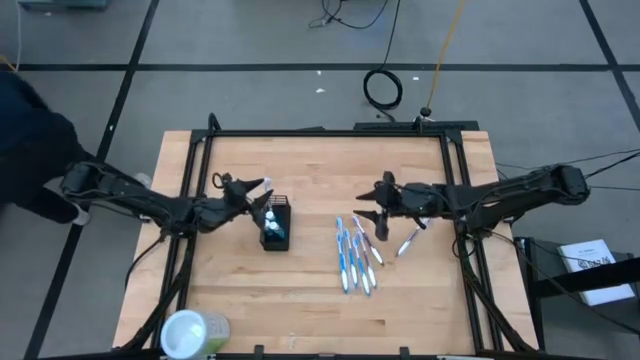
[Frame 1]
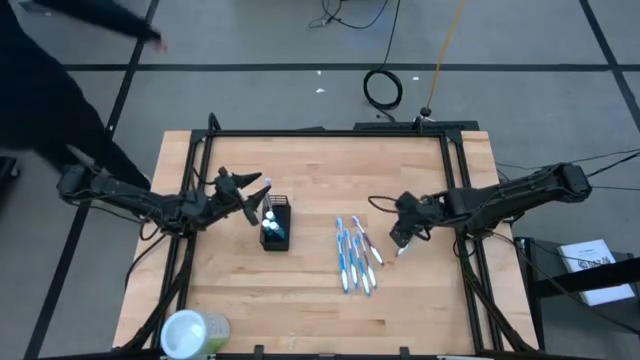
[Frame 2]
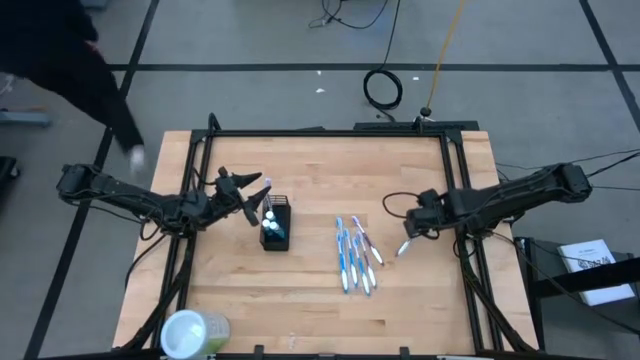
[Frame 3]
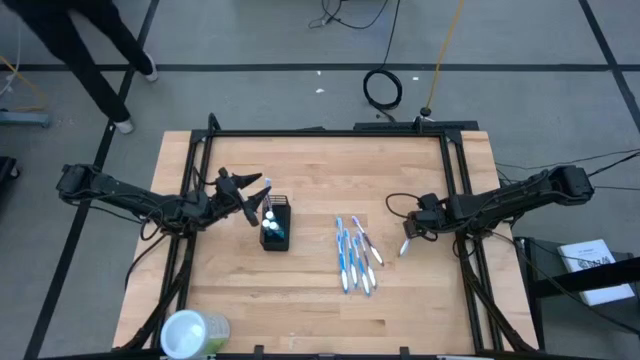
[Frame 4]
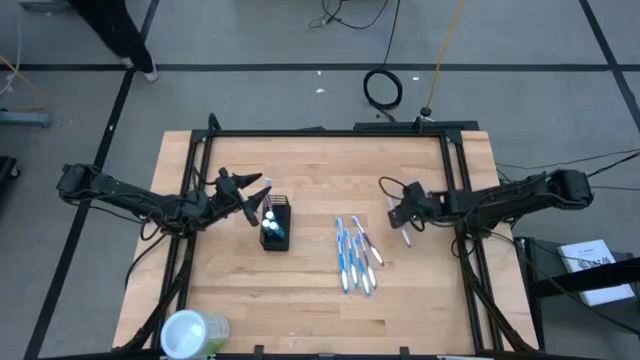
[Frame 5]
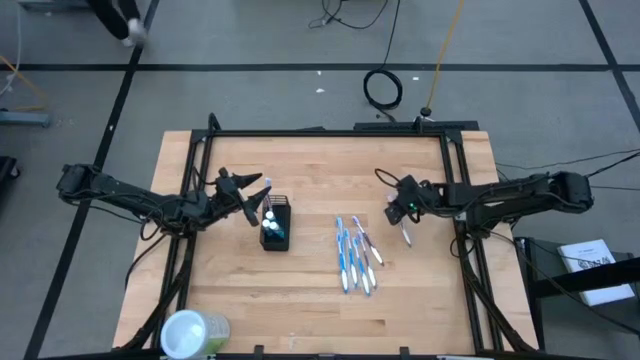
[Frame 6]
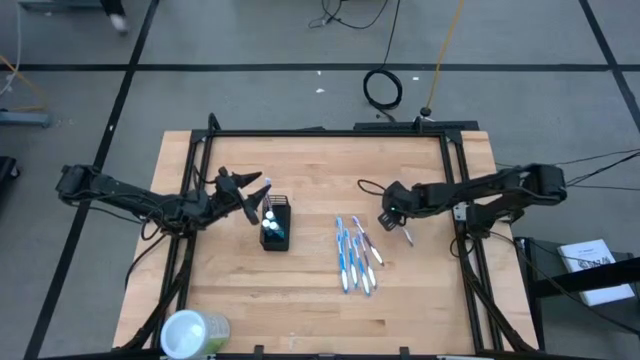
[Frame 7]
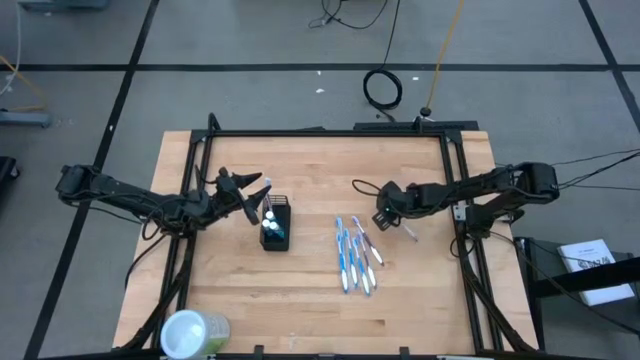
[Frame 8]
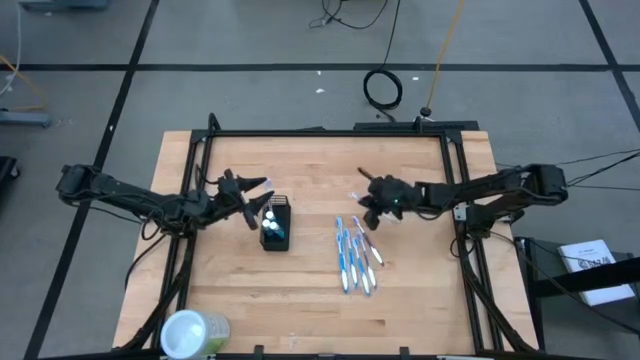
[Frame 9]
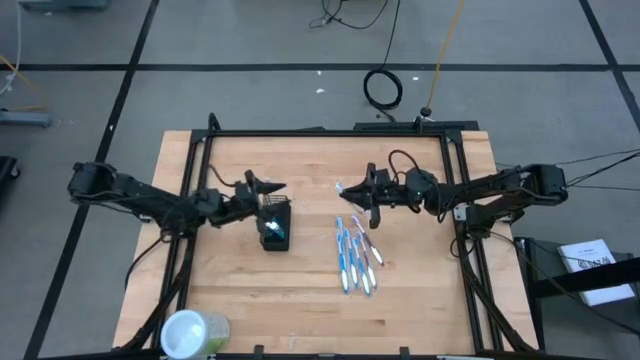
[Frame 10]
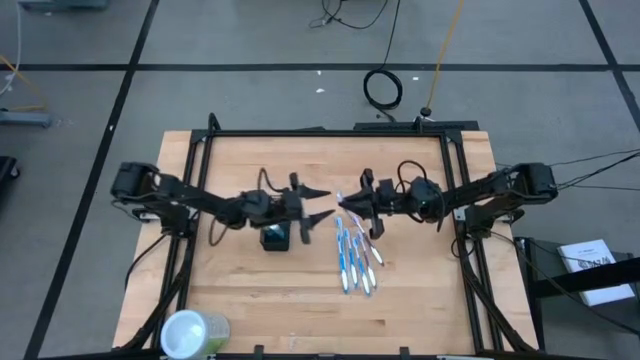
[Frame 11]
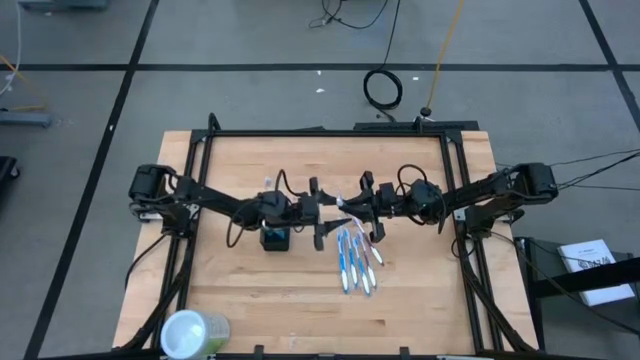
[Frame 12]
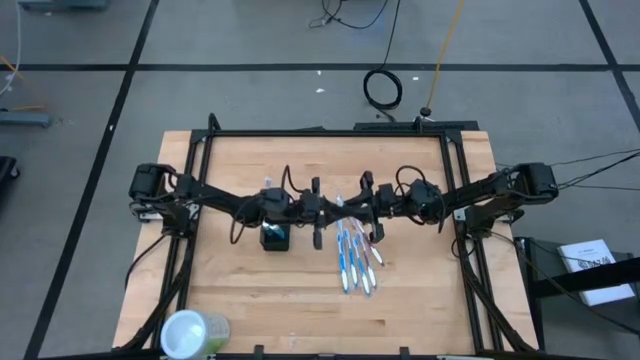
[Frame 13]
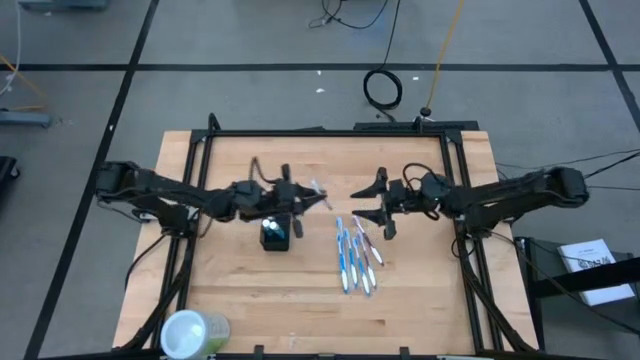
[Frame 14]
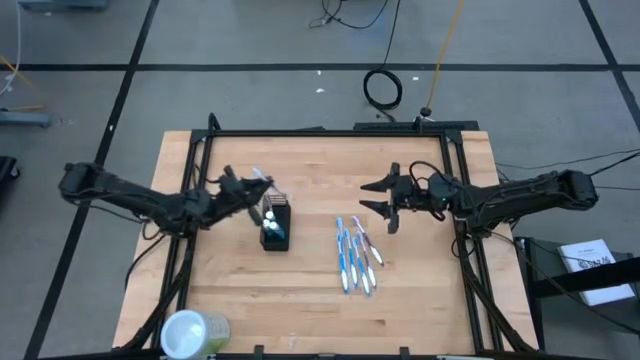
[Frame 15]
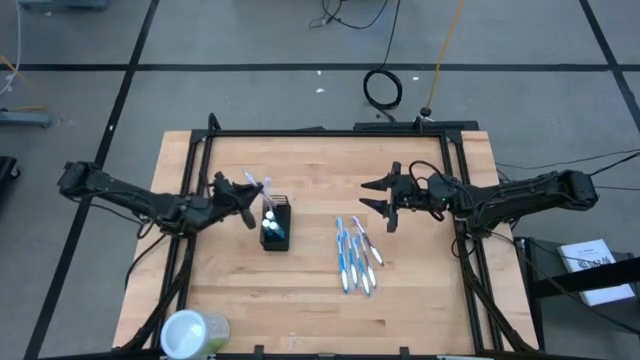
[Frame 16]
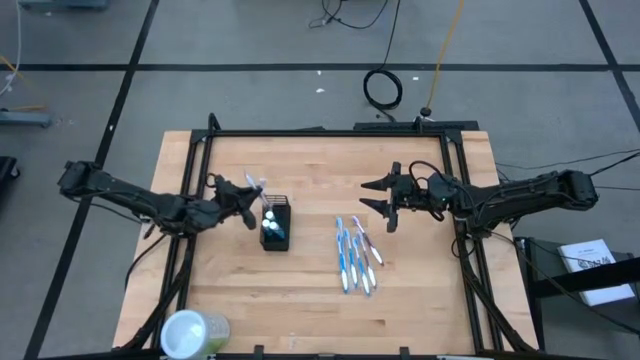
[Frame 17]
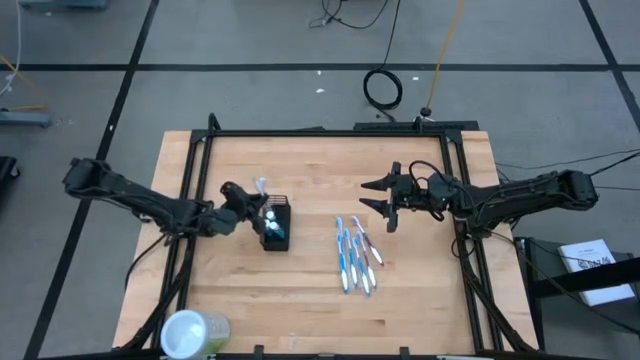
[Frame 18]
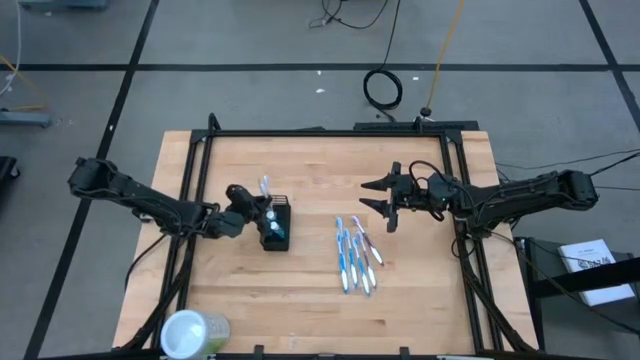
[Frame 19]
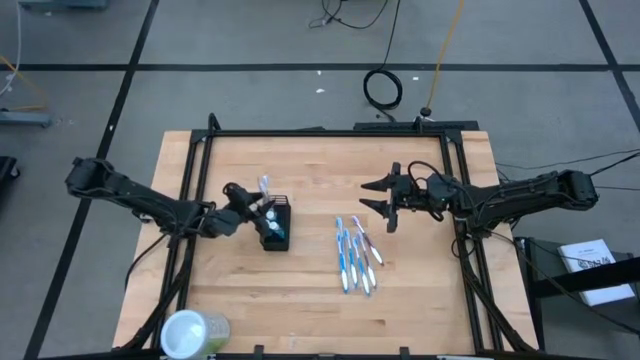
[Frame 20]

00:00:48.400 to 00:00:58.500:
Task: Pick & Place toothbrushing station
Put the purple toothbrush into the top compartment of the mesh organizer

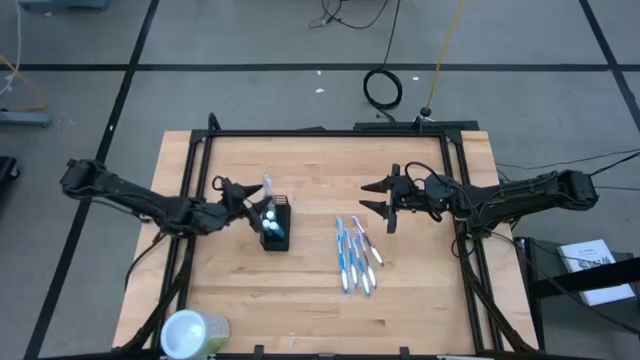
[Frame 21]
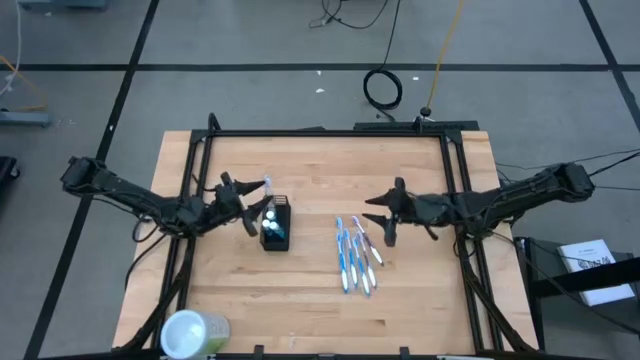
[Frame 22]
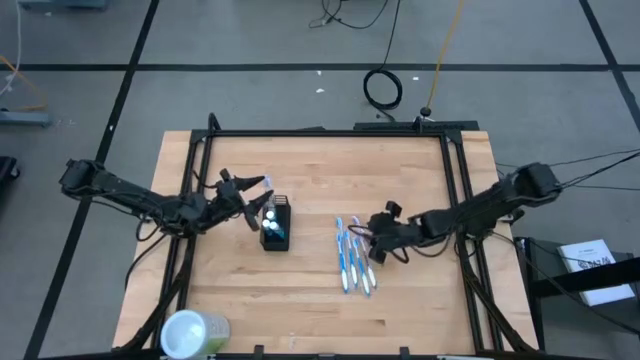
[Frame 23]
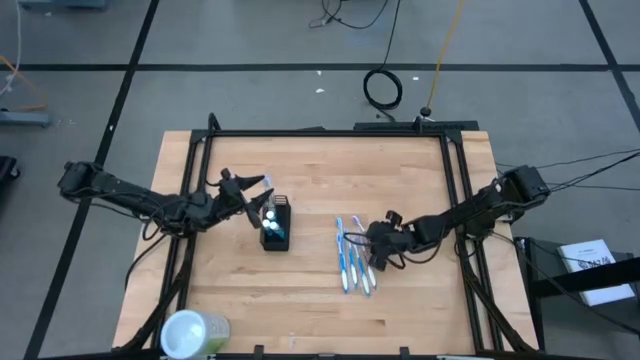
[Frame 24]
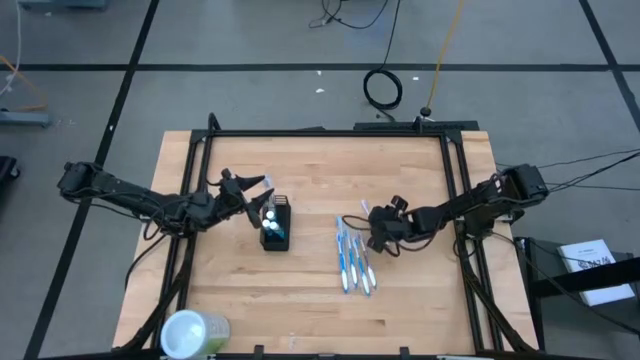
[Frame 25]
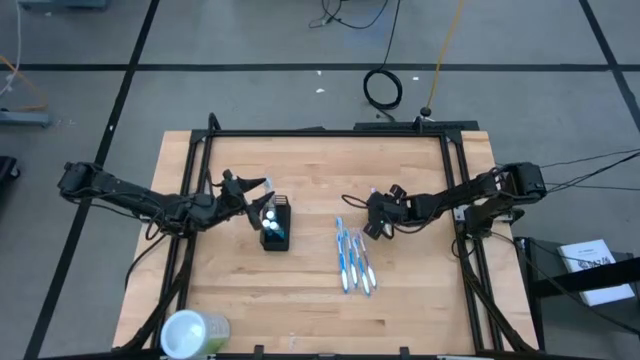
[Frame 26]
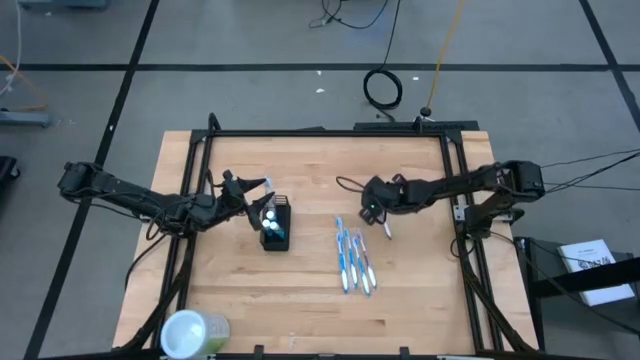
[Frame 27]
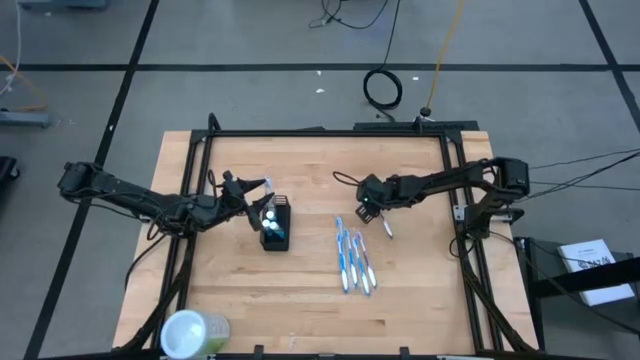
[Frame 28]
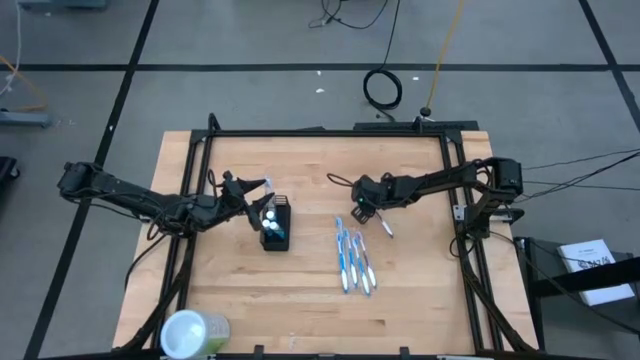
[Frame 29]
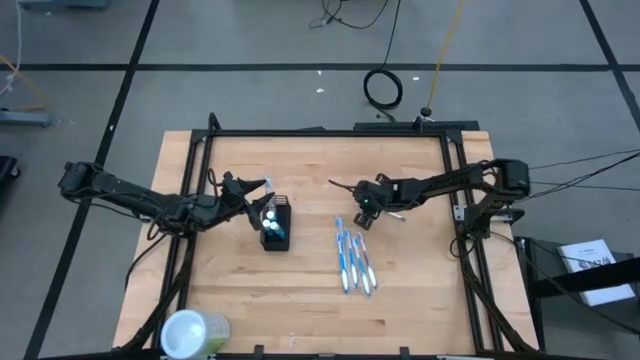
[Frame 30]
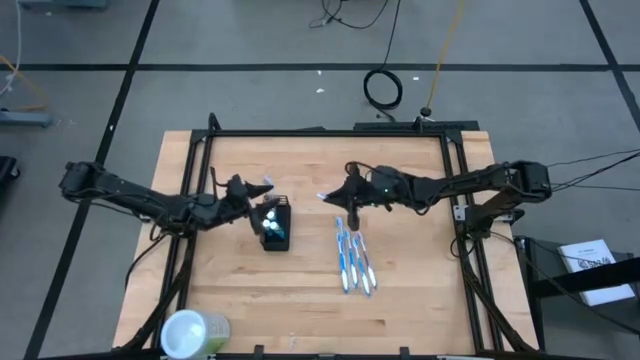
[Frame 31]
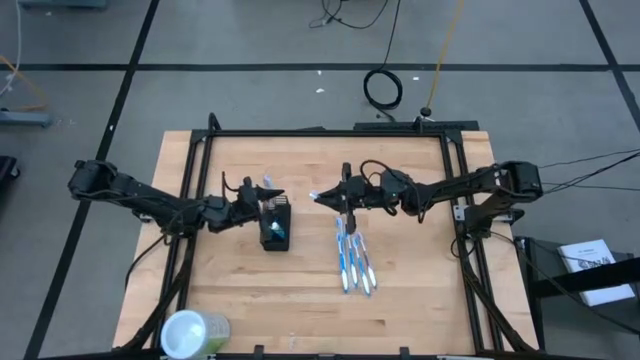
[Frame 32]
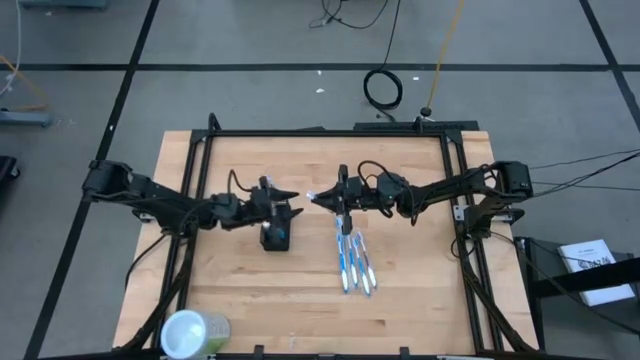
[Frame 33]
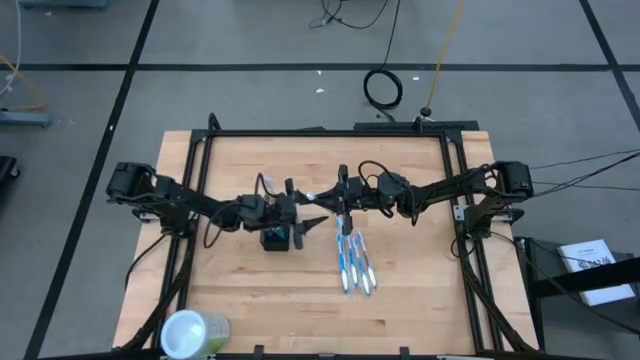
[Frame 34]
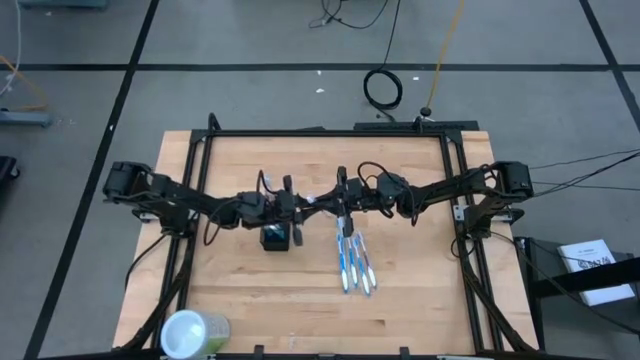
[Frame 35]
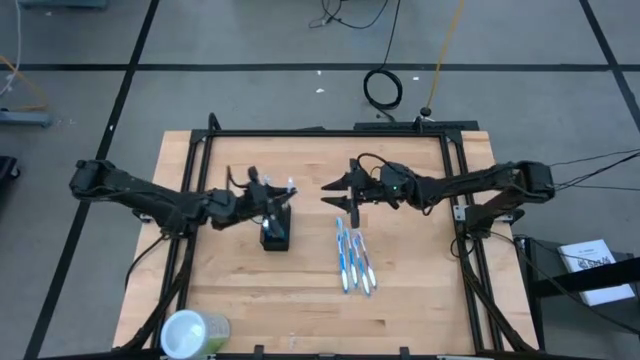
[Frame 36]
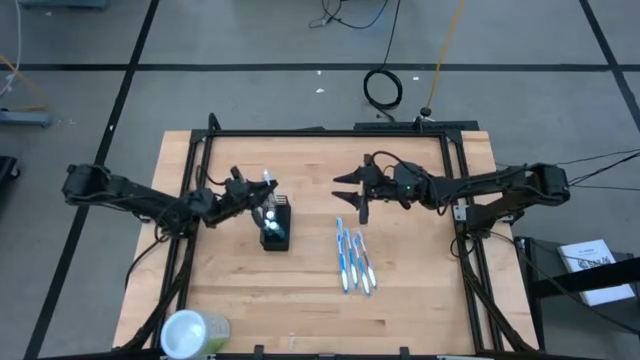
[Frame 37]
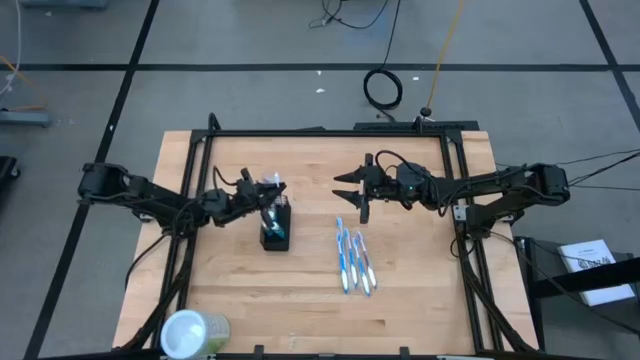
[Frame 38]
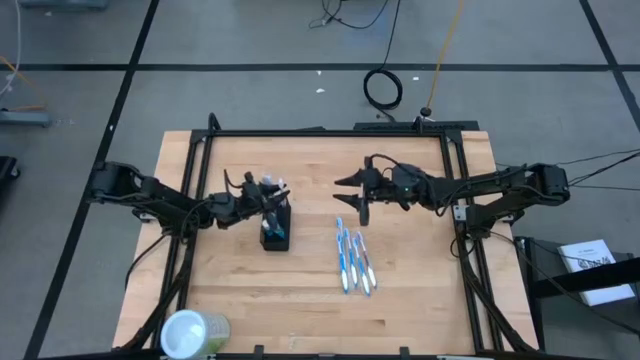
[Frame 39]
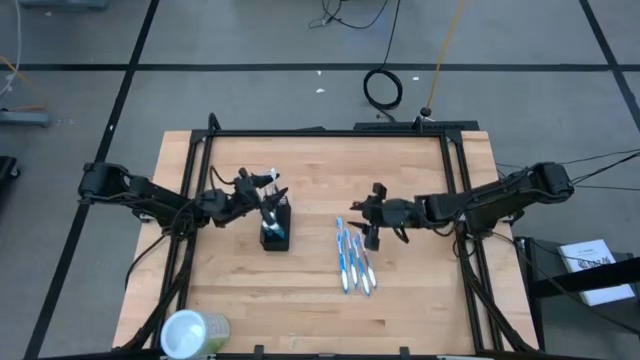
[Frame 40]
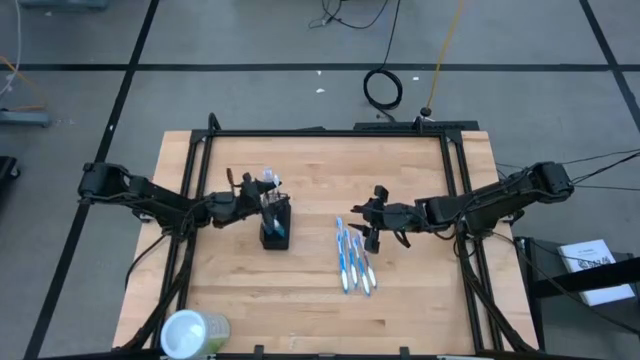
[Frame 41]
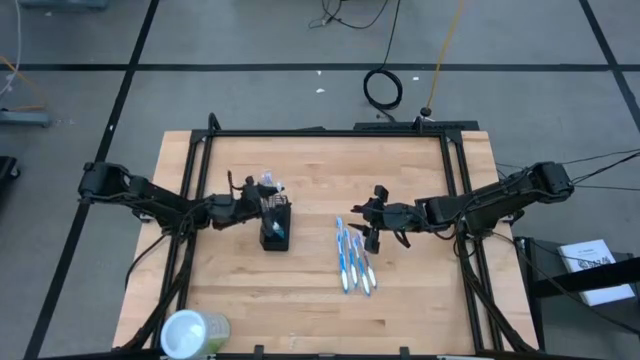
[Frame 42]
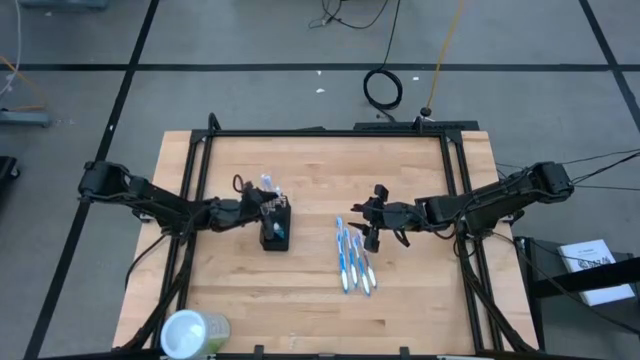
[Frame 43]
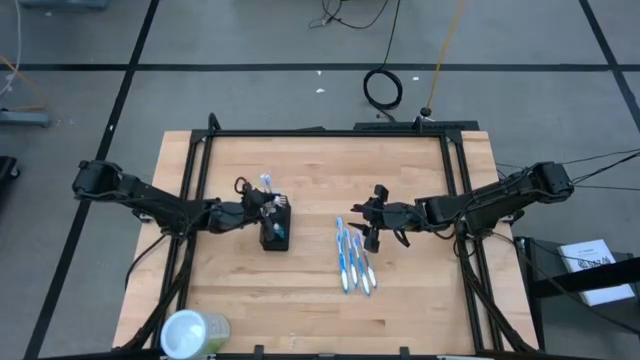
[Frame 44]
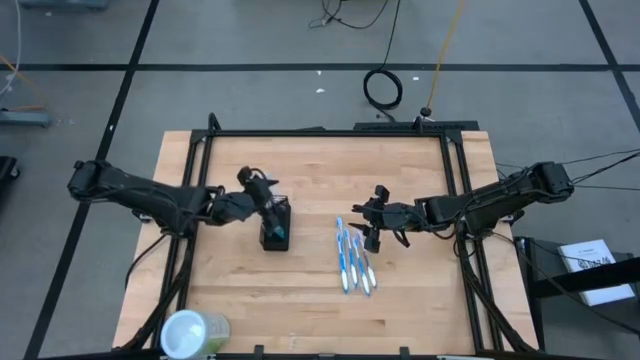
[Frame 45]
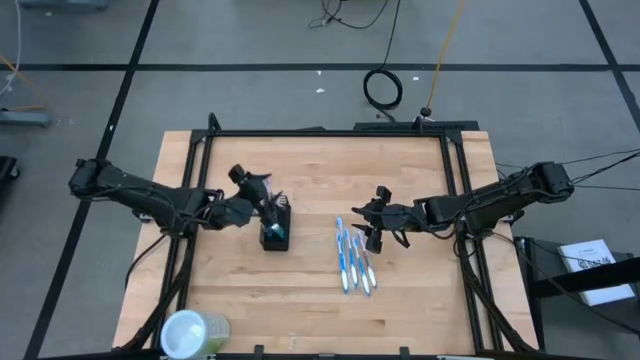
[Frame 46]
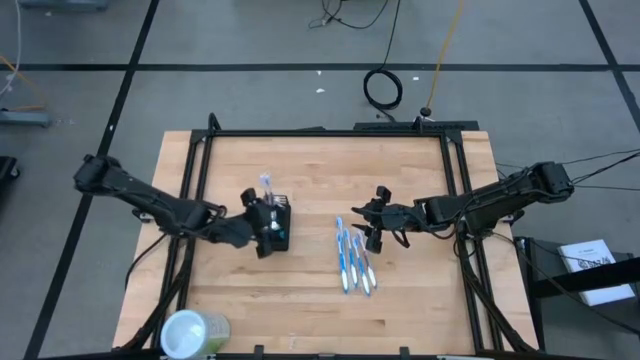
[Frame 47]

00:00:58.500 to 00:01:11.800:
Put the purple toothbrush into the top compartment of the mesh organizer
